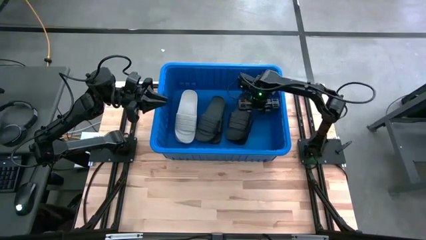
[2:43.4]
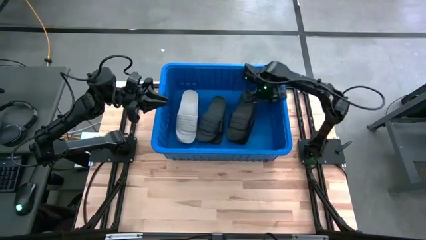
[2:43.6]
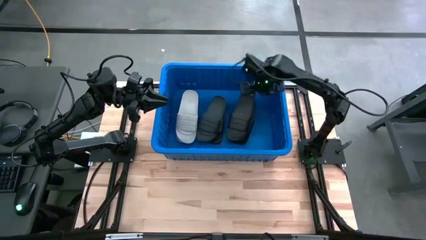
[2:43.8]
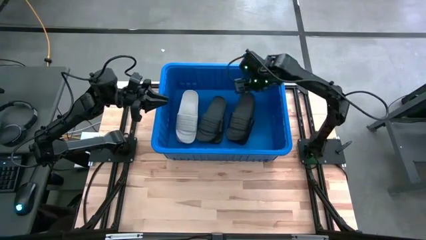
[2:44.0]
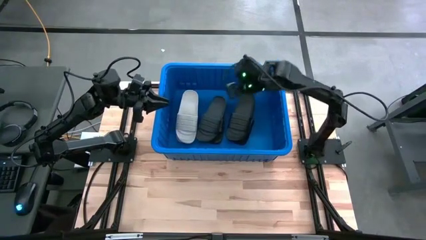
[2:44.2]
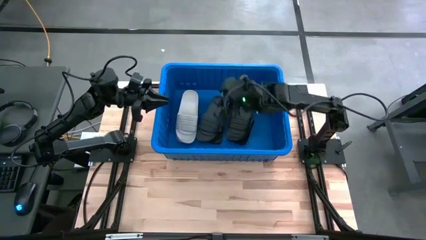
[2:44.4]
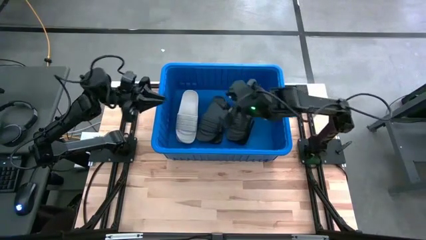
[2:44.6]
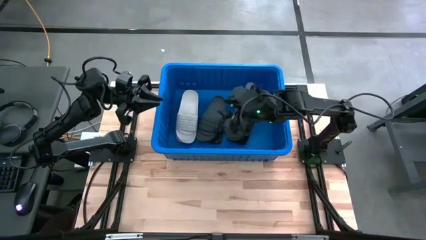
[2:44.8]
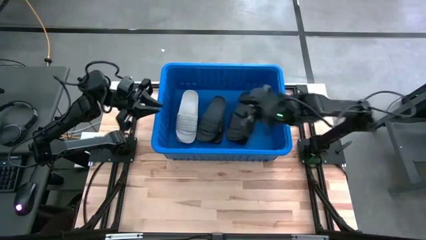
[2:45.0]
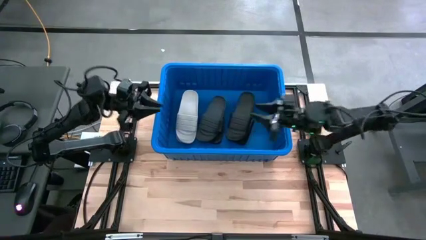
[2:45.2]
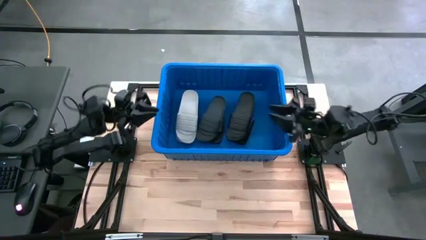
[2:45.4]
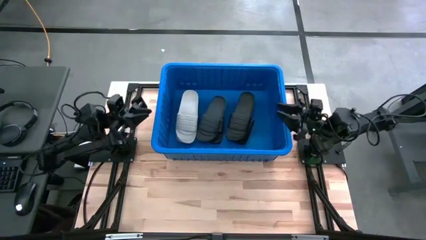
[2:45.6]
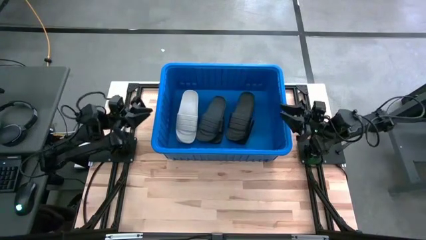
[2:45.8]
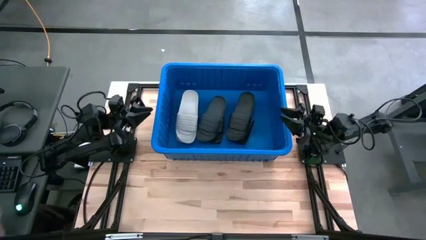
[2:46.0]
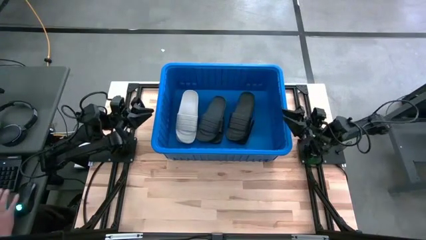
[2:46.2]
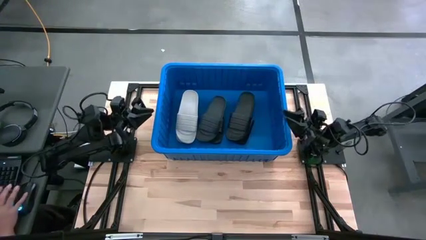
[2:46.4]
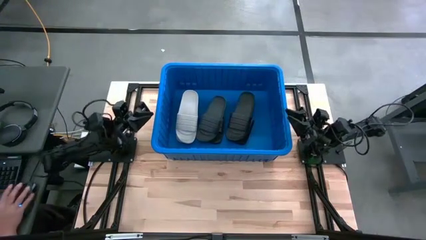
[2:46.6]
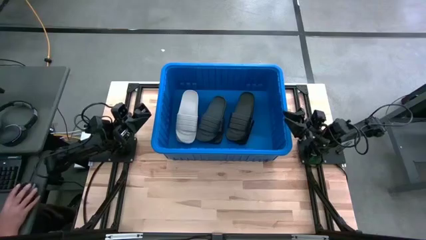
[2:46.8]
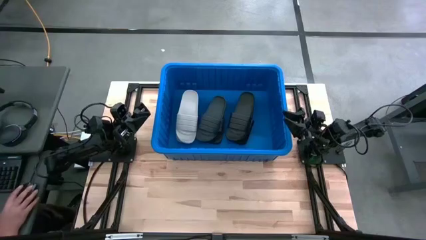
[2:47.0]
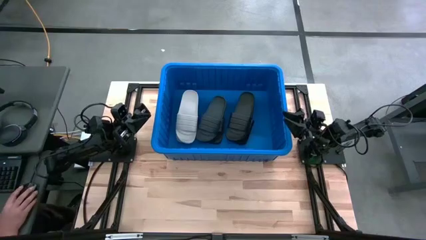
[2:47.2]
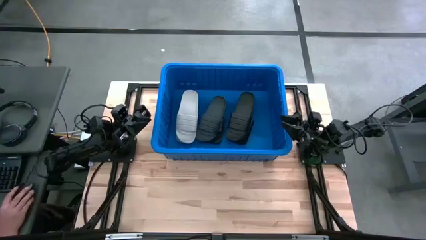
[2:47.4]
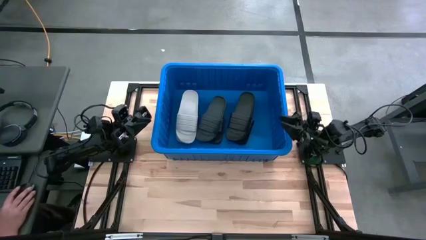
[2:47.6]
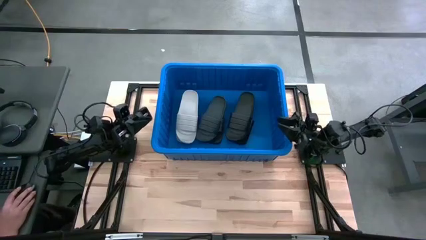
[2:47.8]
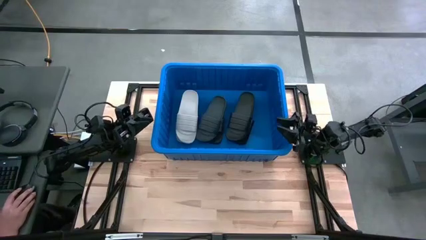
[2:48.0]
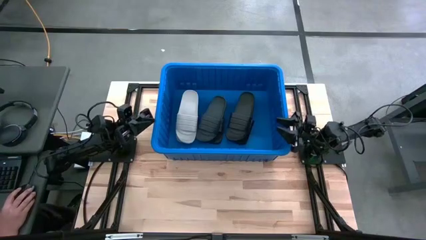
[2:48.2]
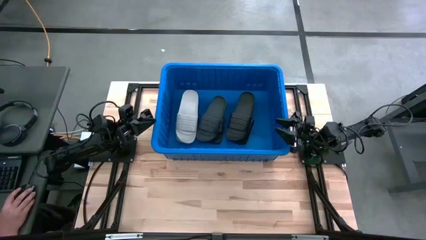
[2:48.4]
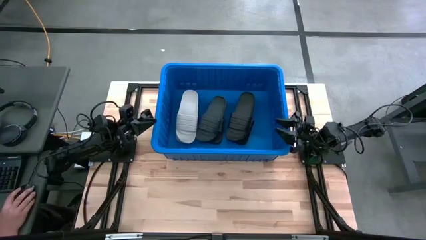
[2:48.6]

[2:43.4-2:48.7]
Task: Pick and place slides into bin
Return to Home Position

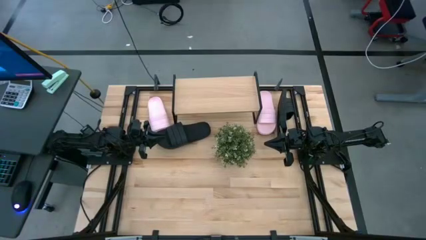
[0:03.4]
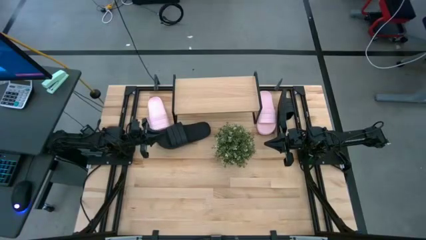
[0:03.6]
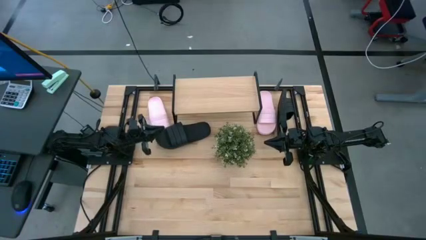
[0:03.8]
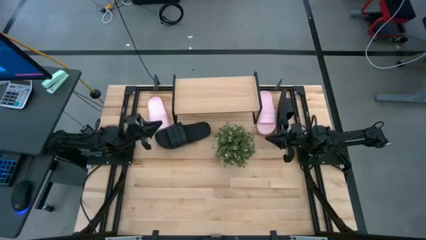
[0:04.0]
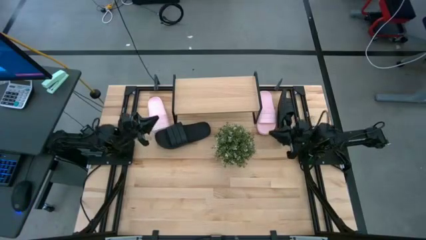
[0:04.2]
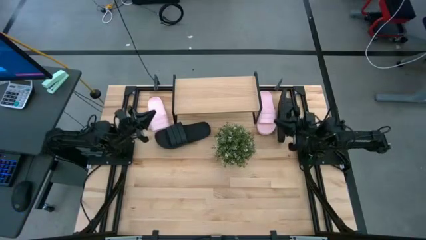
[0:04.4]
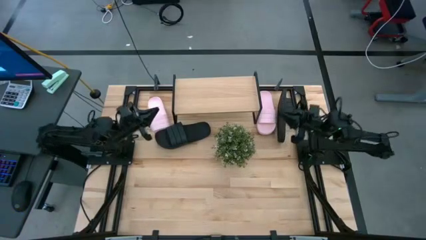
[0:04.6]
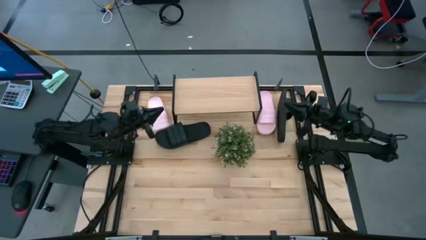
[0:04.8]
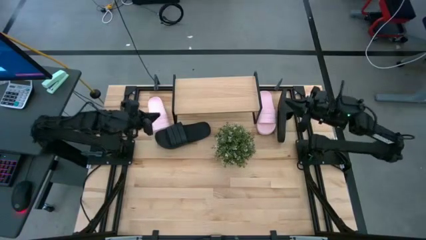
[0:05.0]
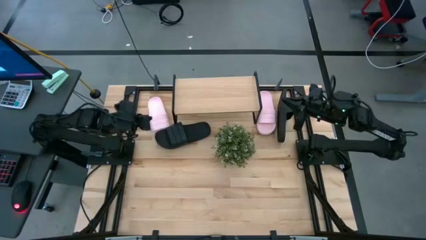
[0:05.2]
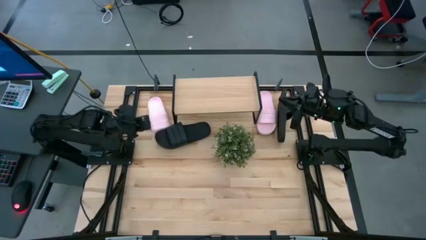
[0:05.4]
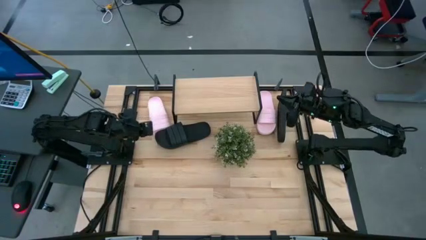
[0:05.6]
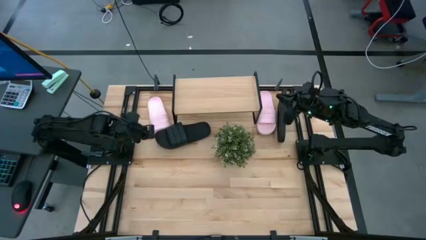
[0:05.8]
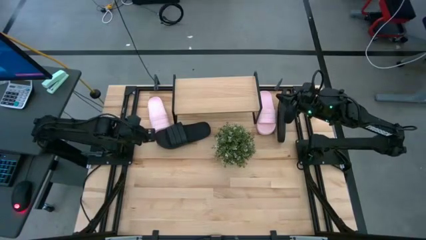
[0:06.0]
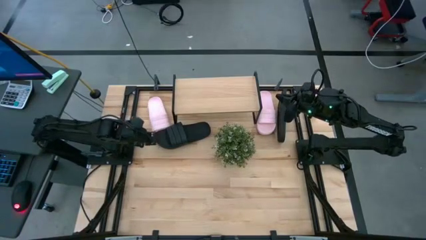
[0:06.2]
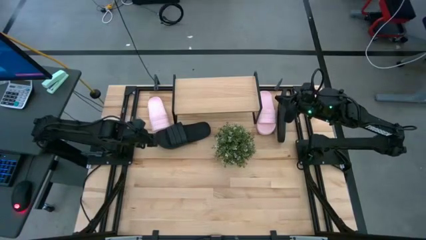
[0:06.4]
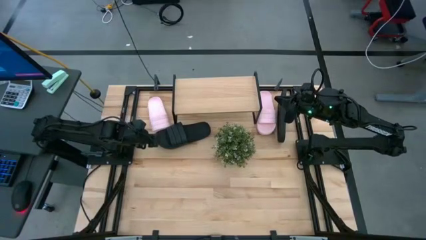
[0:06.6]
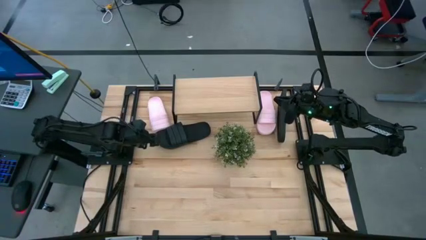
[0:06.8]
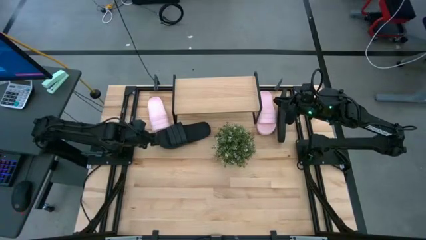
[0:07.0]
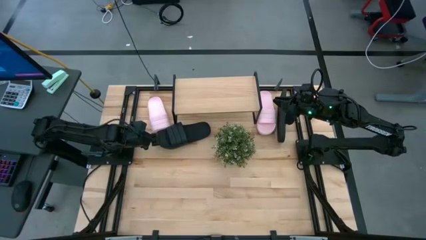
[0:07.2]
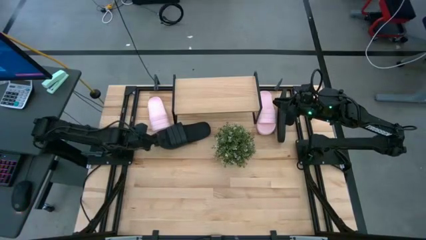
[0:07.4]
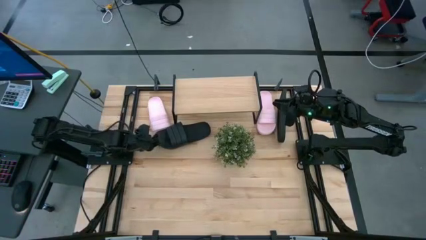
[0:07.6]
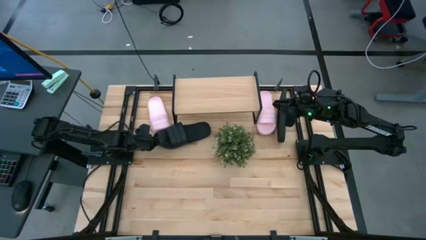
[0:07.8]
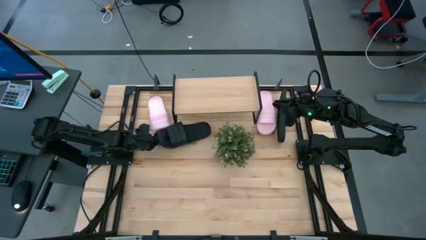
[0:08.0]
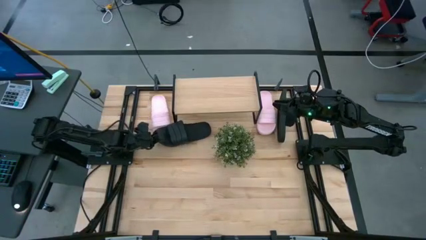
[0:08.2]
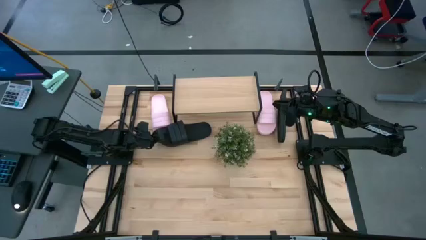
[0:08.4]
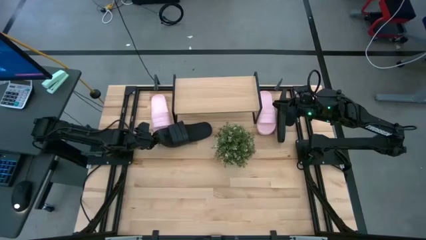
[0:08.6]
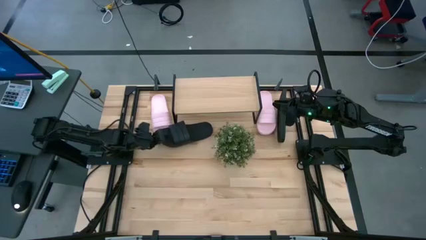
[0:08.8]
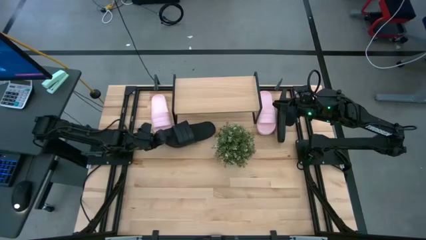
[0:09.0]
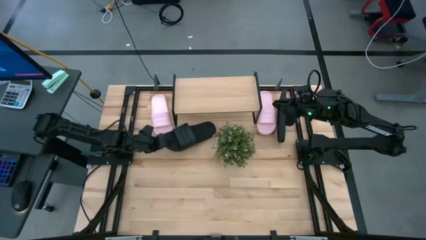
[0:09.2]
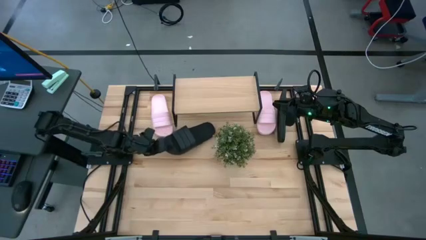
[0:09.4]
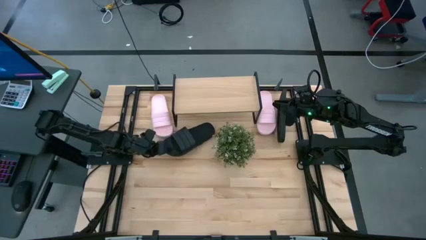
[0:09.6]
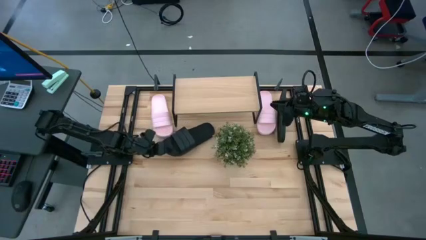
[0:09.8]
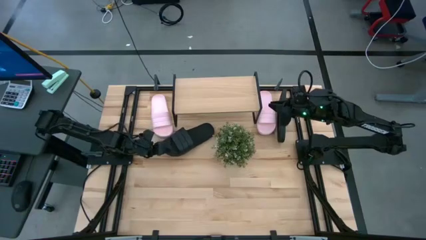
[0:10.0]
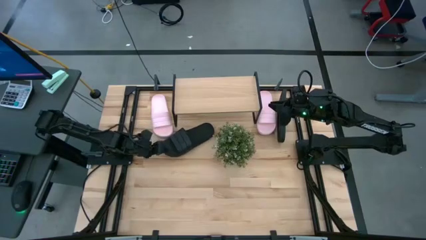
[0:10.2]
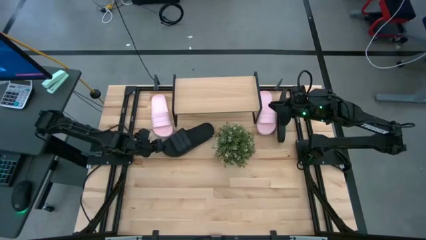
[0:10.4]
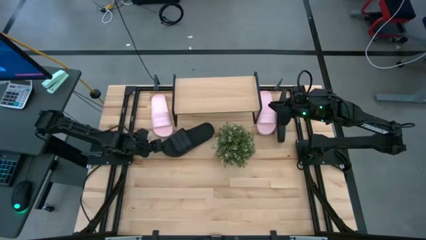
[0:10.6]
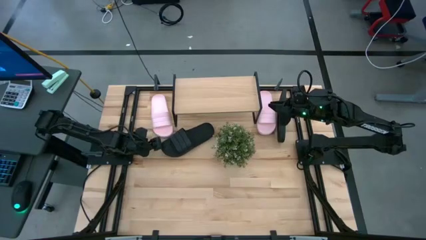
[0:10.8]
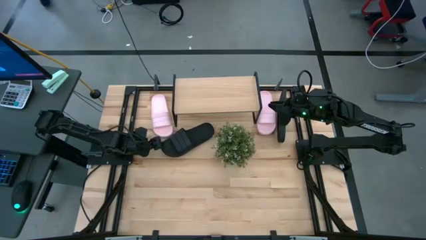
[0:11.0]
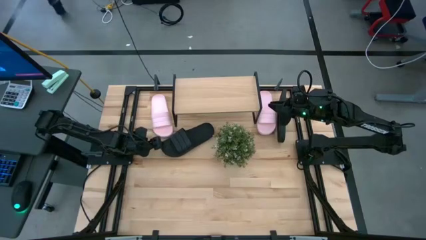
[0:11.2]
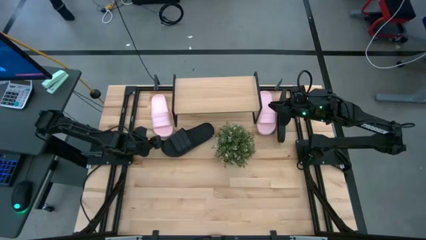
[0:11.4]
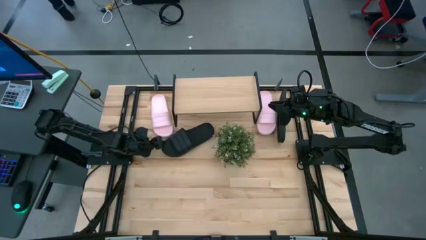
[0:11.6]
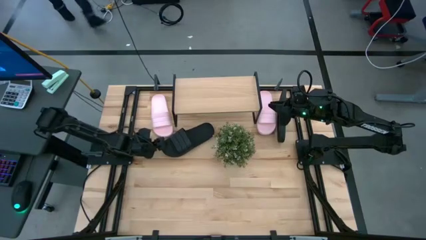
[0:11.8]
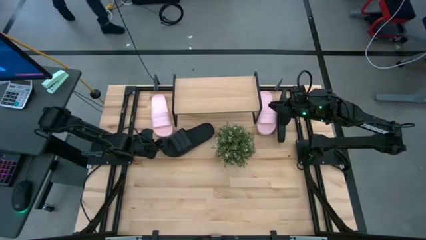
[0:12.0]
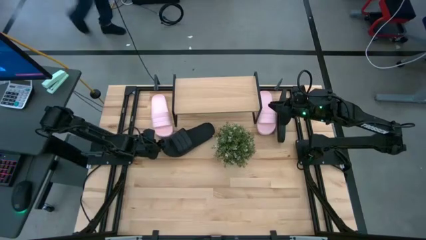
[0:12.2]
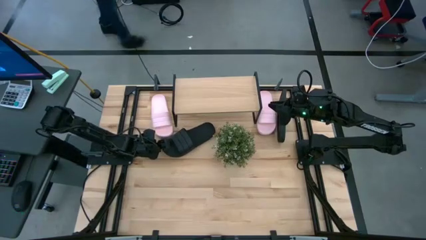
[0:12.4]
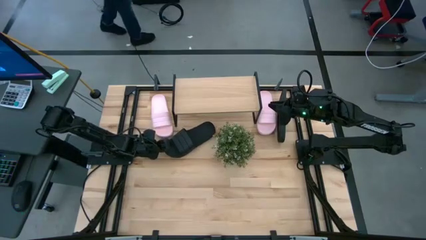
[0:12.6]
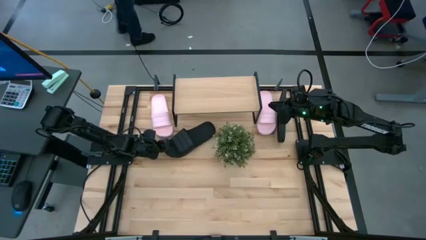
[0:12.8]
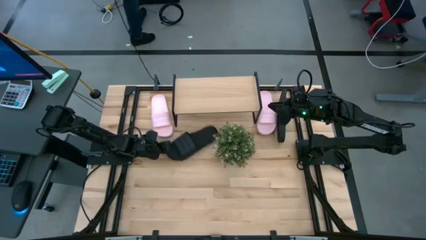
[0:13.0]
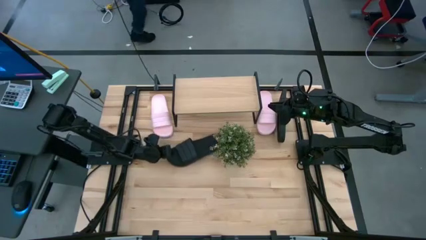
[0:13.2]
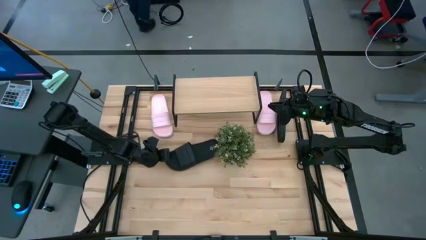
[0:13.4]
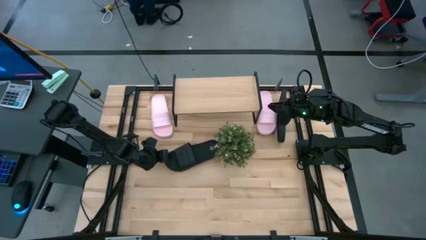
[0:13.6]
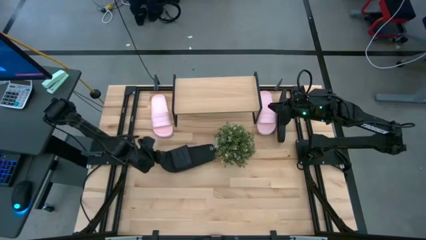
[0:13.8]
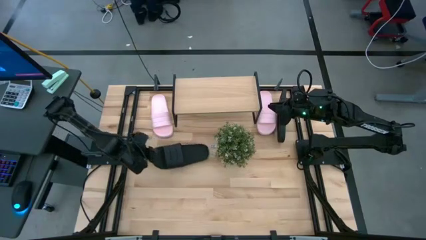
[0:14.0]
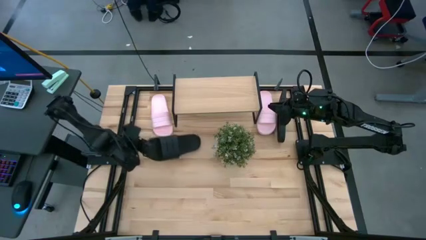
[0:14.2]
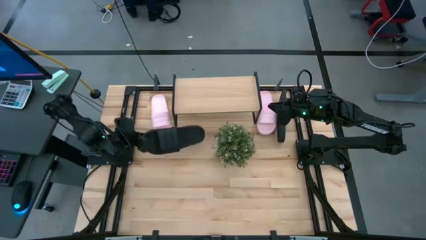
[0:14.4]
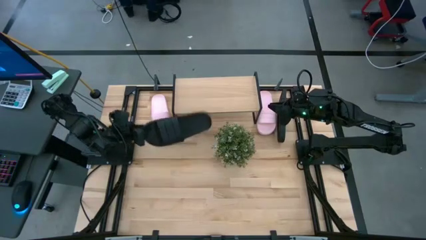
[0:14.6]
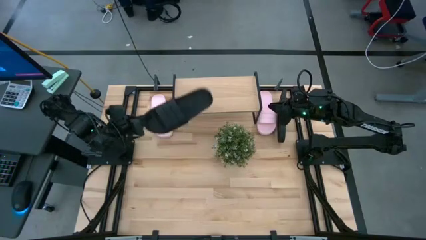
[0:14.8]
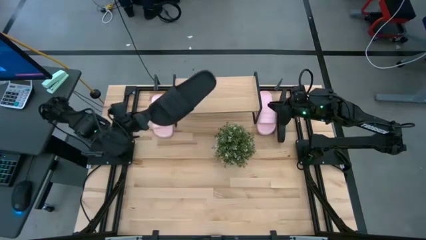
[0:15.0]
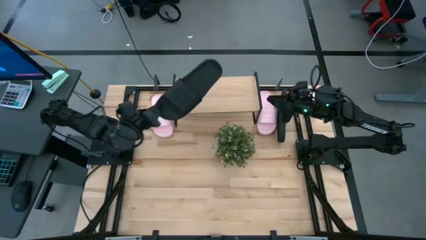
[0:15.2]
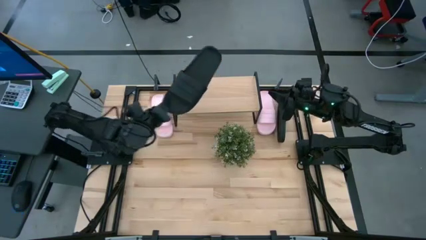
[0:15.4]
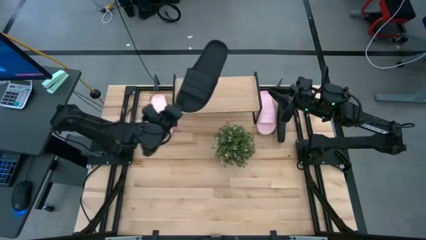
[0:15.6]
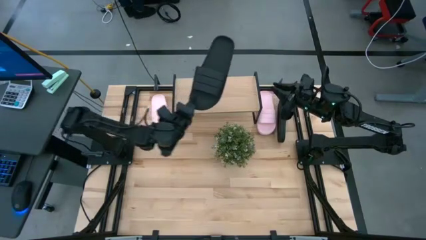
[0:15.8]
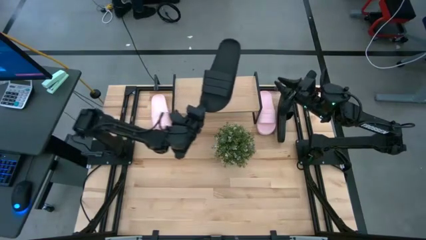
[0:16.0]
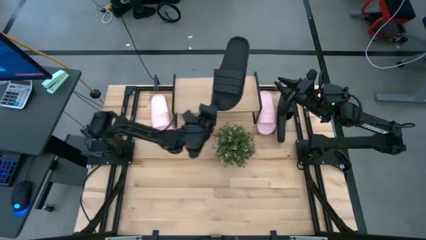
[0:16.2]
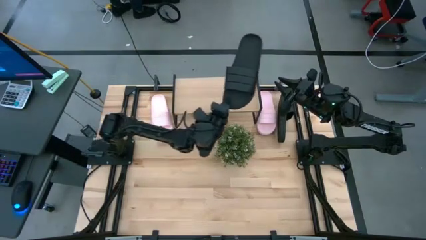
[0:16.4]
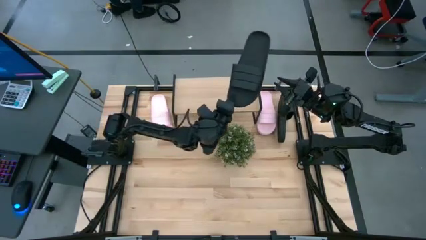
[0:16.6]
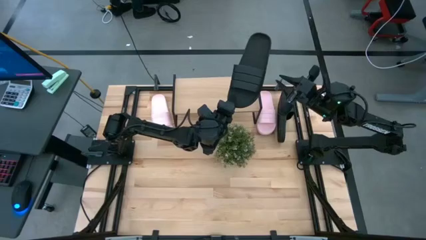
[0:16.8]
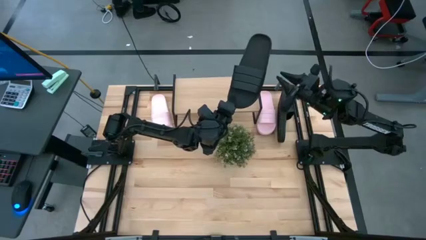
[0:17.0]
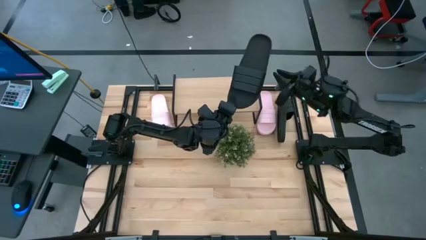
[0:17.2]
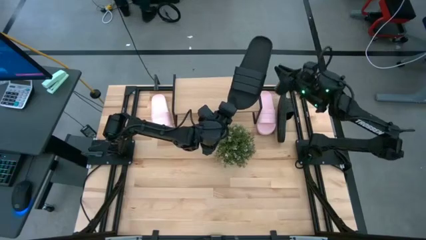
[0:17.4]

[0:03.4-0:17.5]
Task: Pick and place slides into the shelf
Put the left black slipper on the shelf
